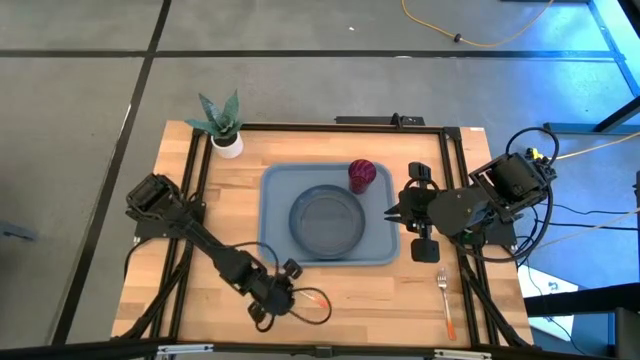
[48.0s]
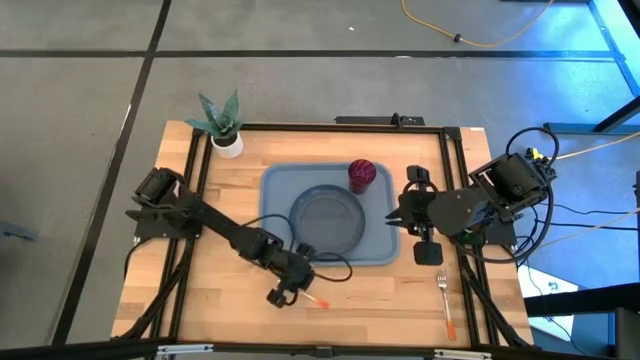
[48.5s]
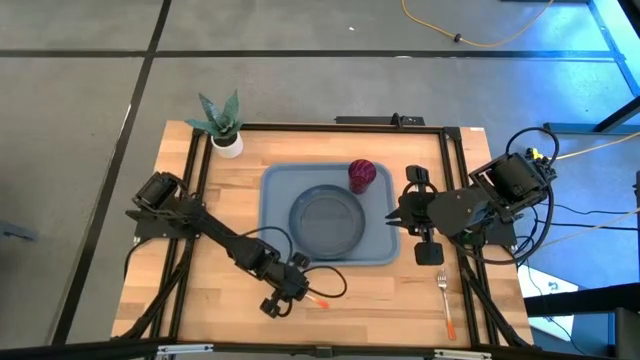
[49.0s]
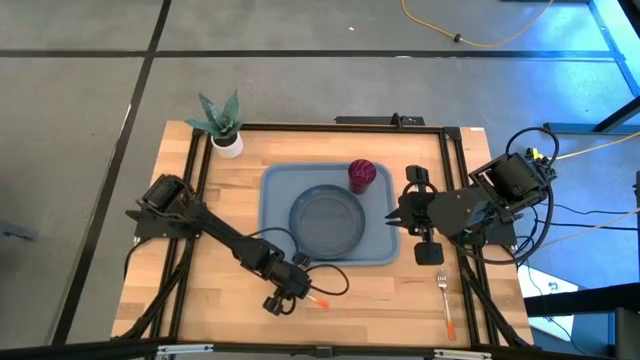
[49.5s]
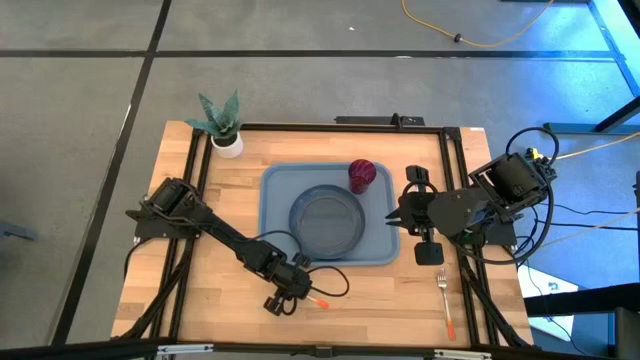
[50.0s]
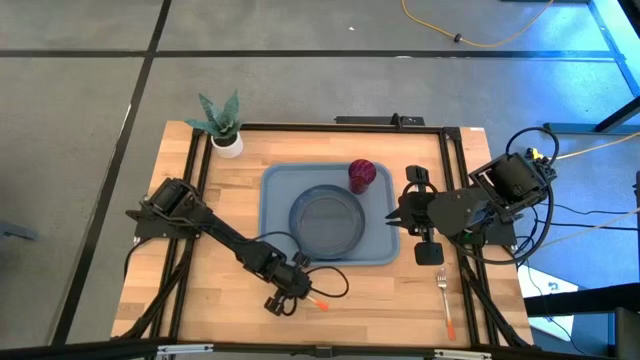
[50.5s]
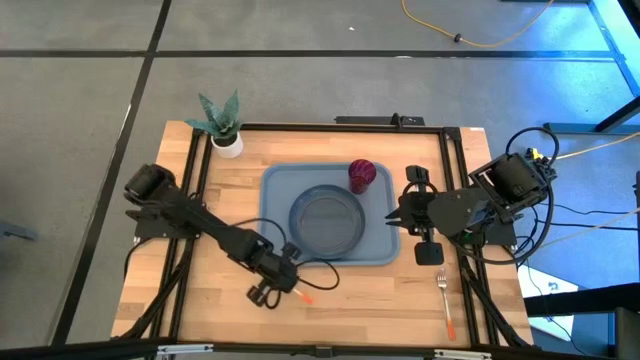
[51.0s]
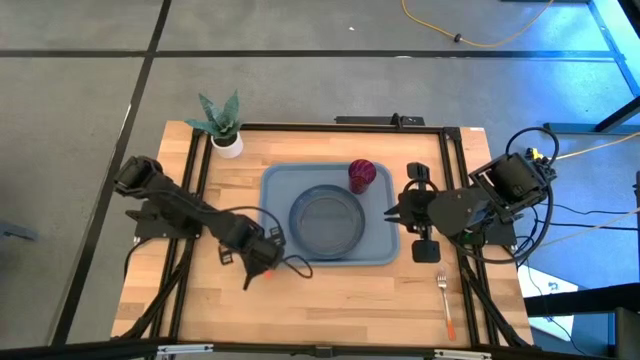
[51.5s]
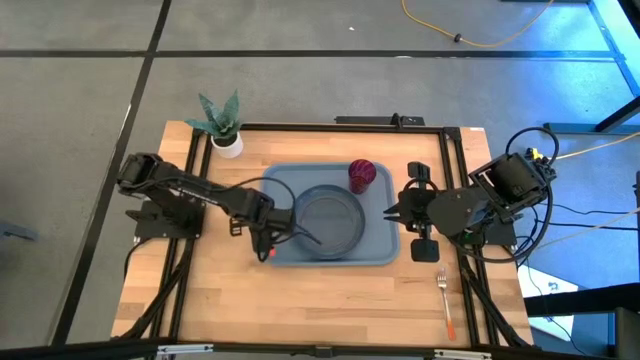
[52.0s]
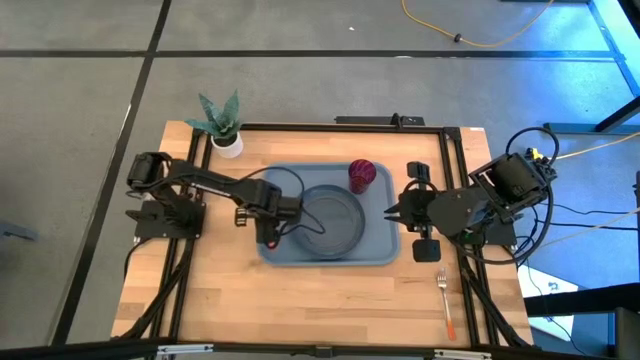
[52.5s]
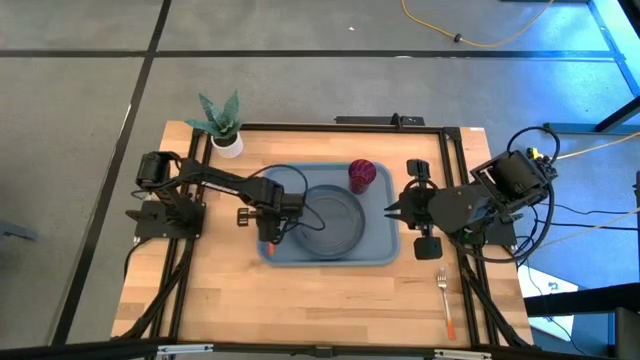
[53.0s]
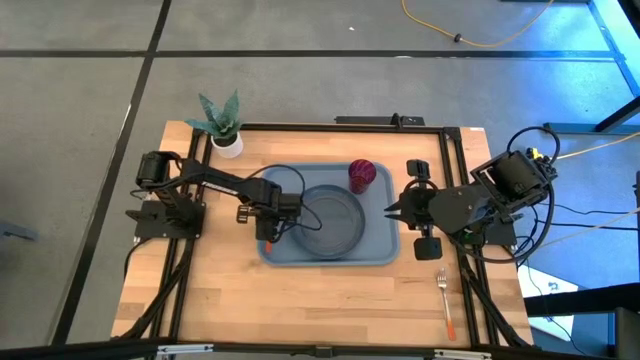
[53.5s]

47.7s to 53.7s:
Task: Pick and place plate/cup/fork/spoon on tray
Put the orange spoon on the blue tray

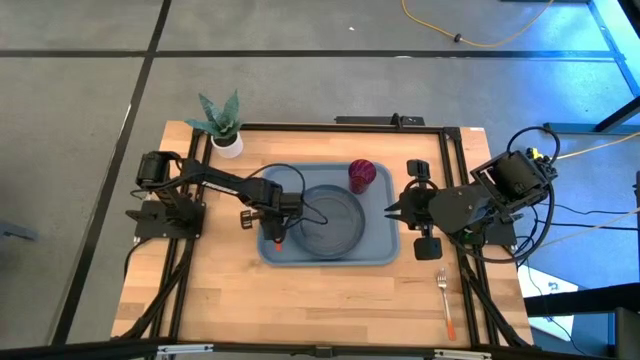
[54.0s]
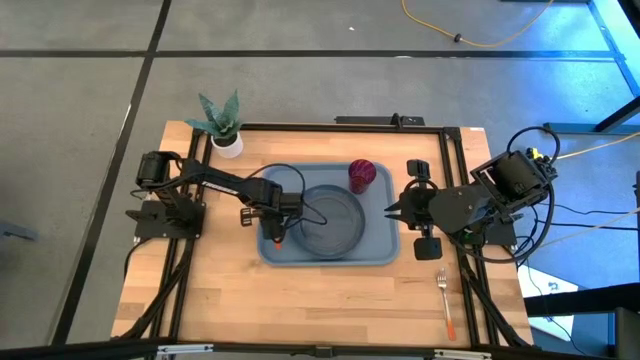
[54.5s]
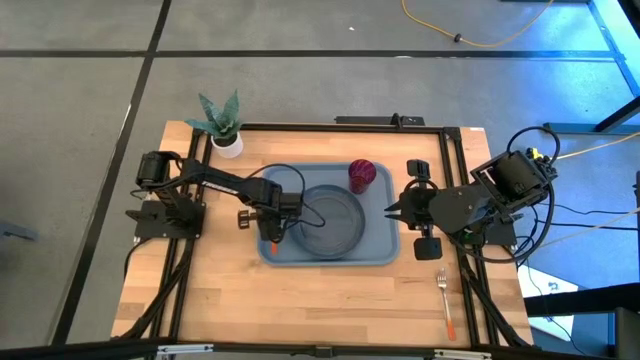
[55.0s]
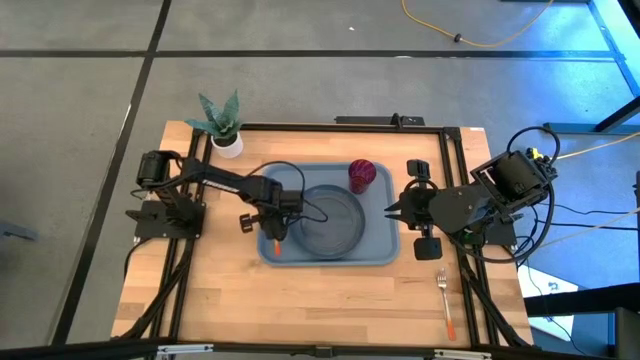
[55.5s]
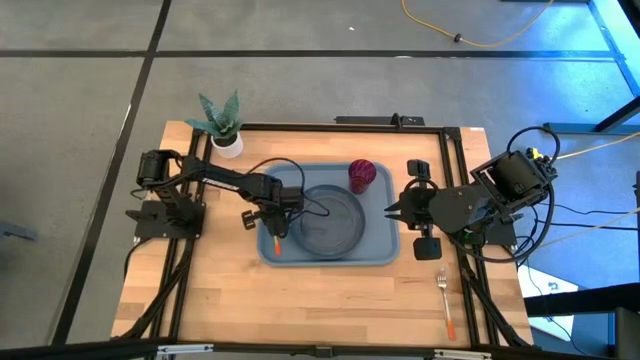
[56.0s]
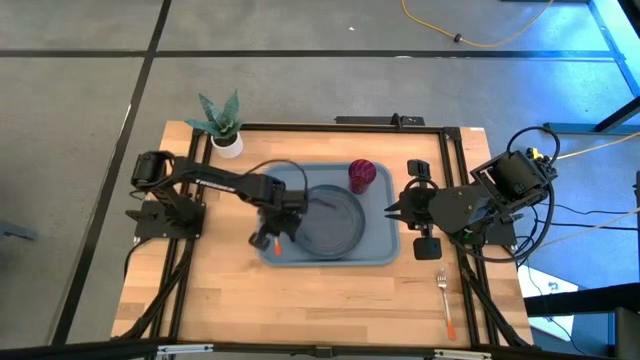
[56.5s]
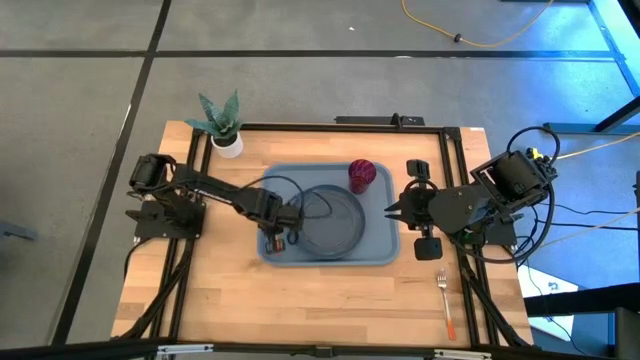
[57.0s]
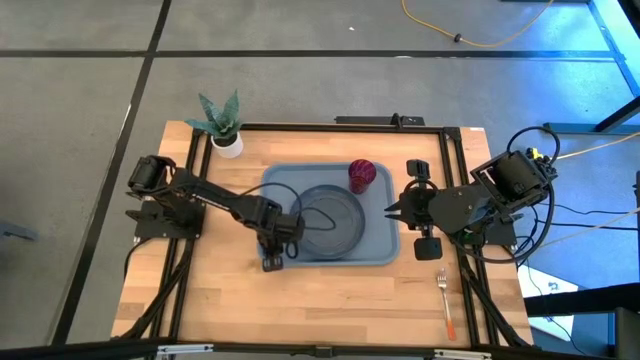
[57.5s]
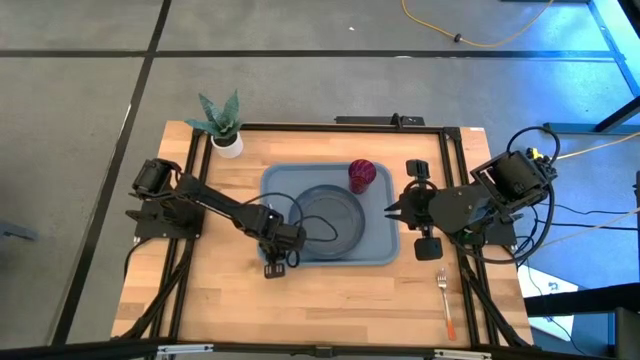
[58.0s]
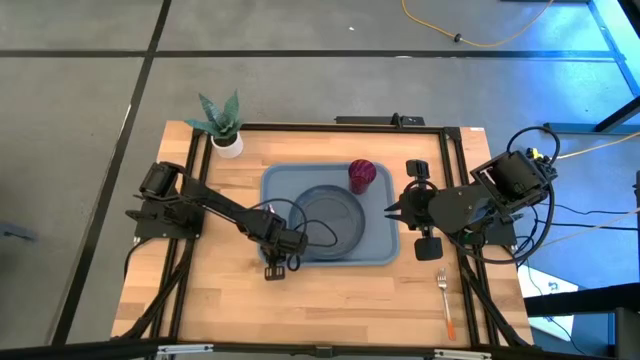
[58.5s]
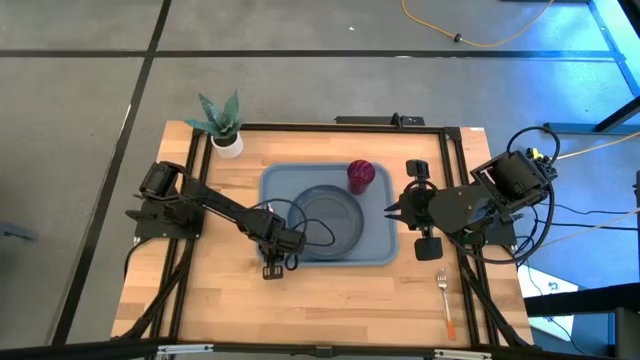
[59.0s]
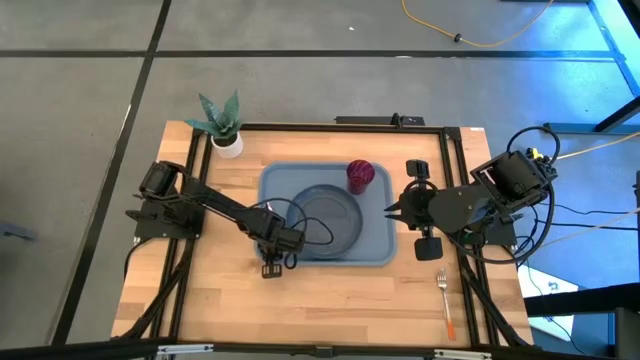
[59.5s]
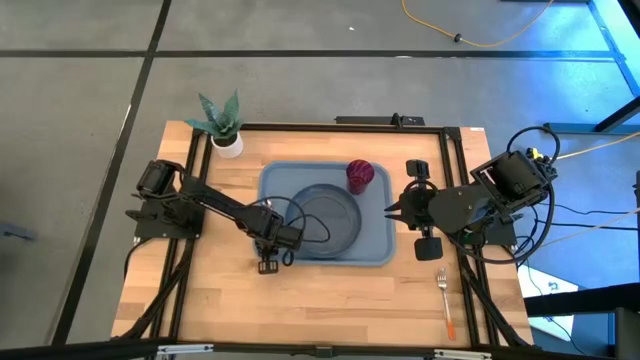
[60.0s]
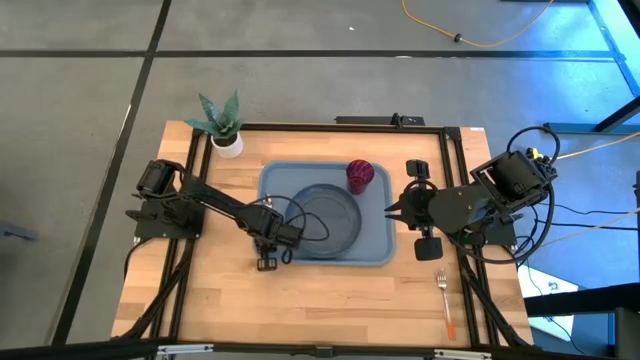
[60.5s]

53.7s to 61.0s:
Adjust the orange spoon on the blue tray

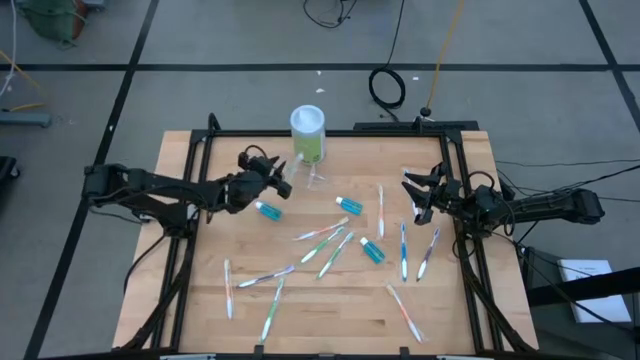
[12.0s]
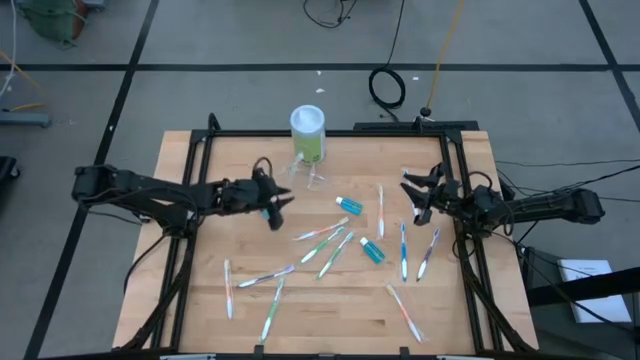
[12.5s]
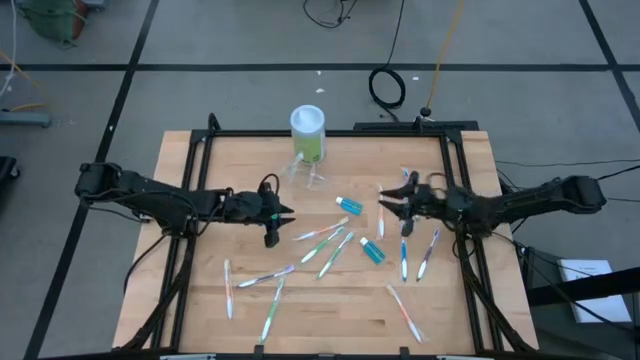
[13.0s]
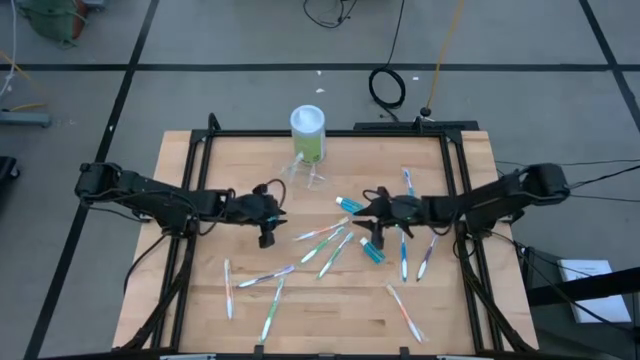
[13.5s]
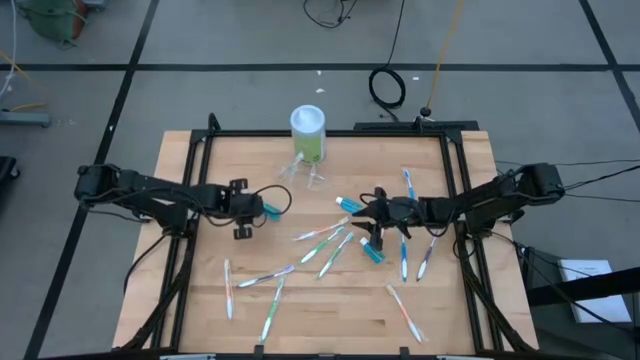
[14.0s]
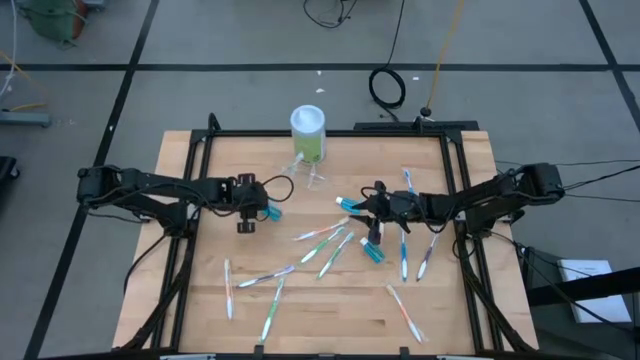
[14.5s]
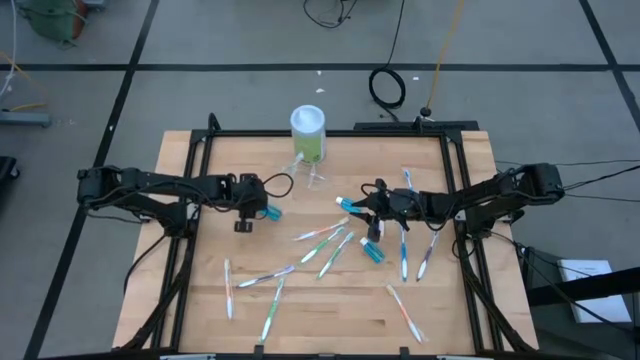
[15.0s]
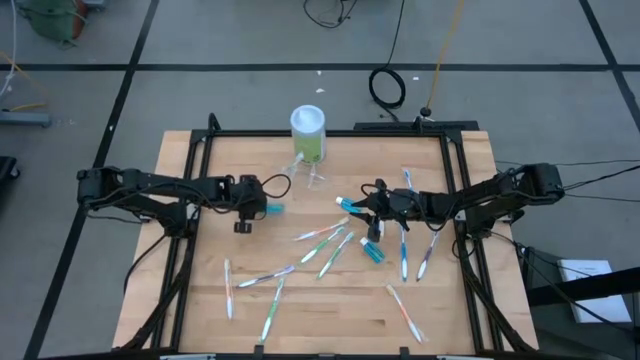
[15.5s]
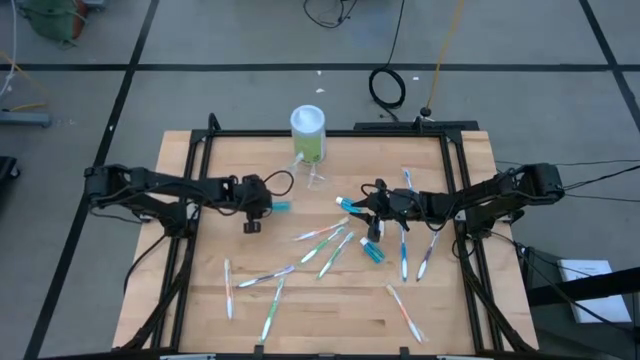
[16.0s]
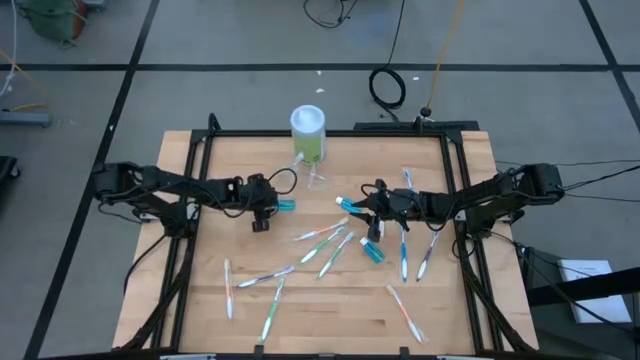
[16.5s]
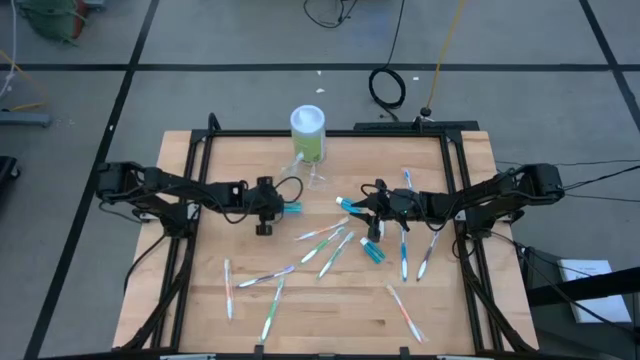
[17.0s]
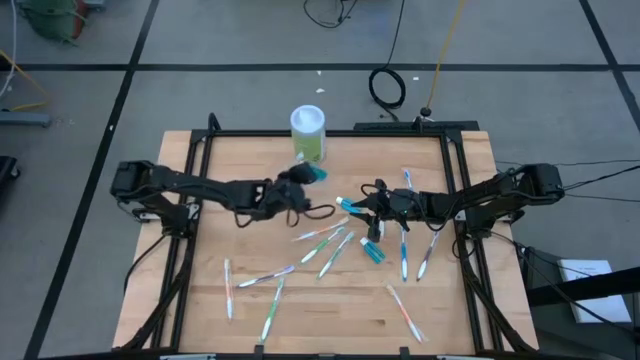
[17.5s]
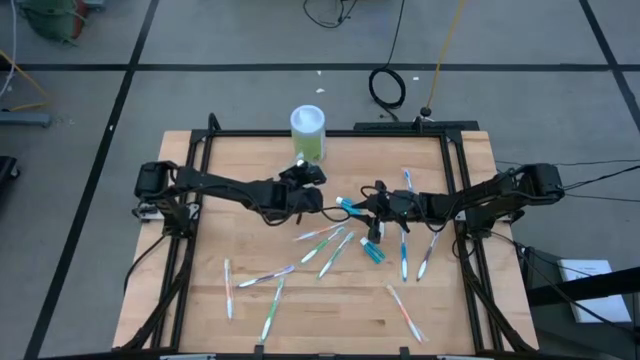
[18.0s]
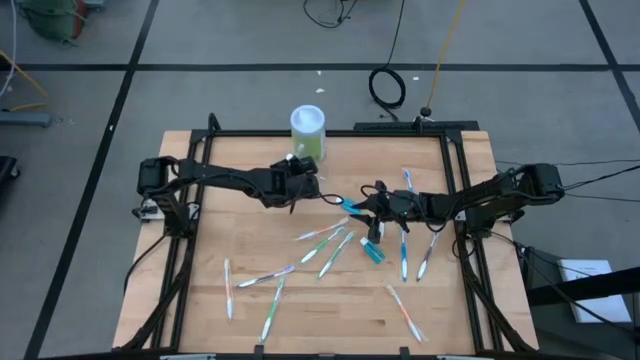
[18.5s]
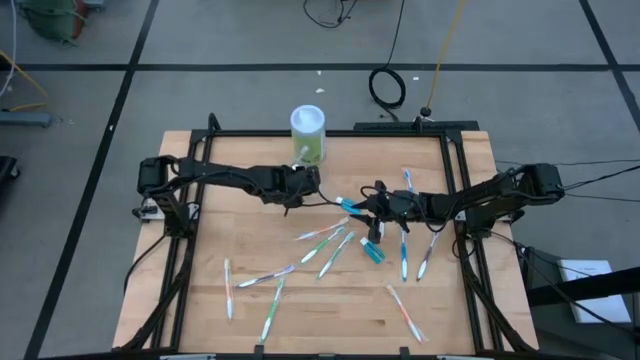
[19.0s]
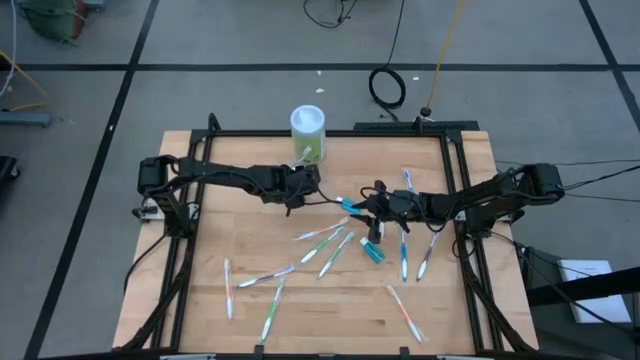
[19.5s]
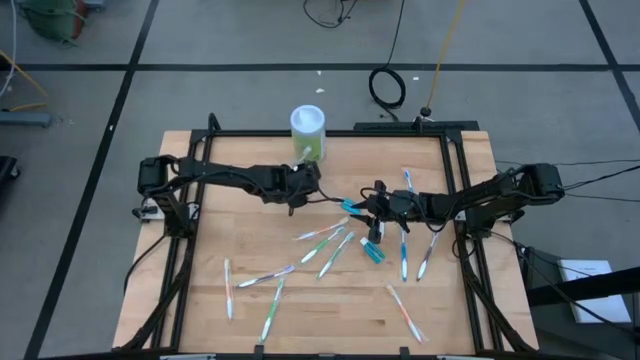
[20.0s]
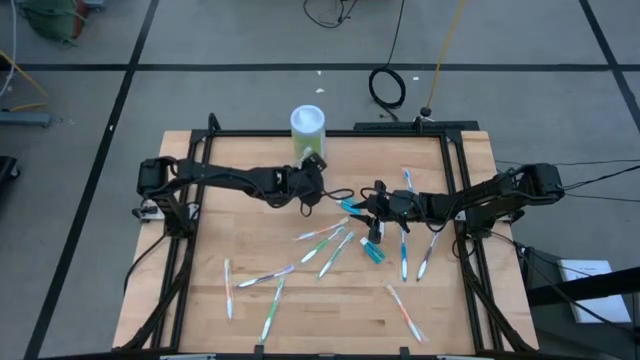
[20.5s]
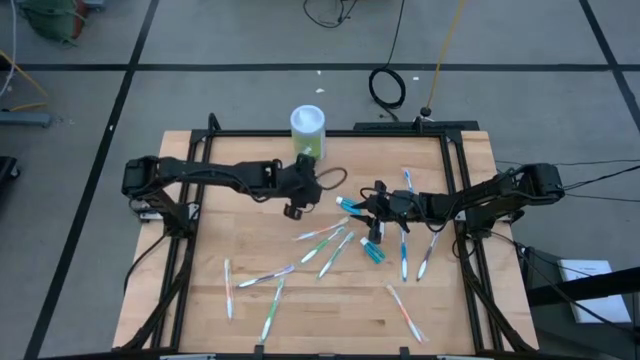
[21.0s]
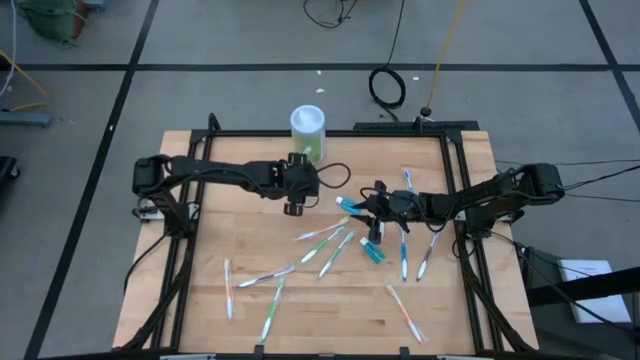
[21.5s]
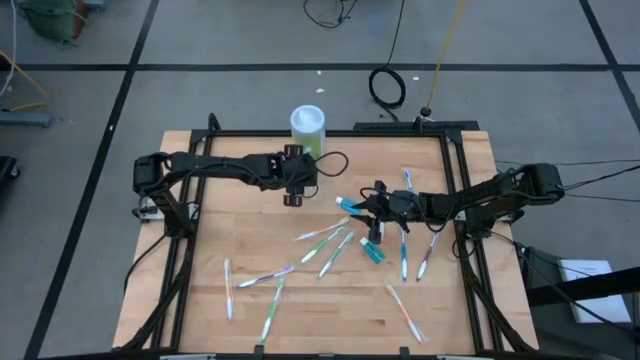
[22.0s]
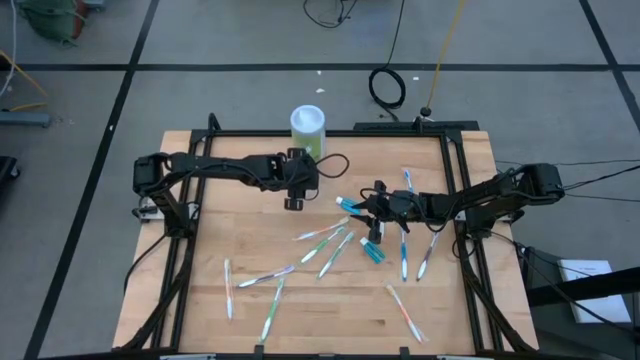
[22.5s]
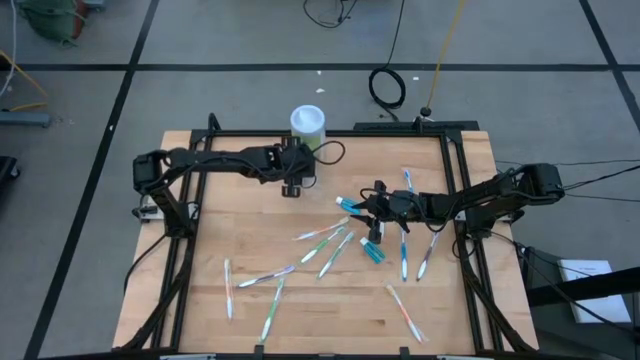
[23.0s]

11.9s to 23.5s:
Task: Pick & Place toothbrushing station
Put the blue mouthwash bottle into the middle of the transparent organizer
